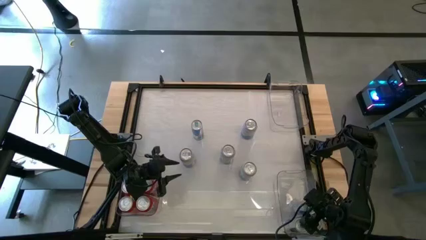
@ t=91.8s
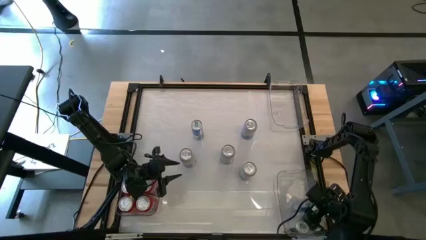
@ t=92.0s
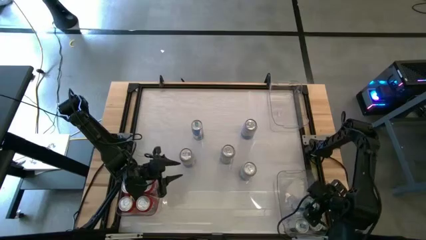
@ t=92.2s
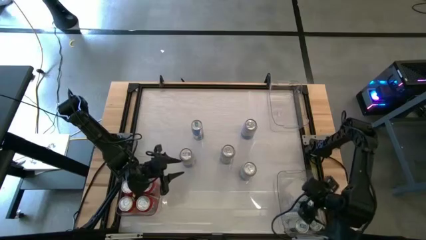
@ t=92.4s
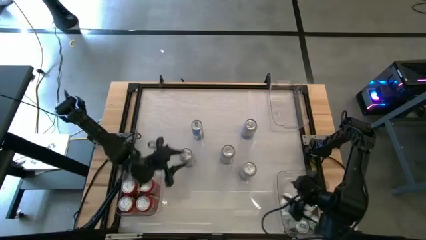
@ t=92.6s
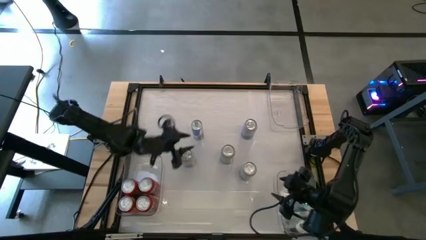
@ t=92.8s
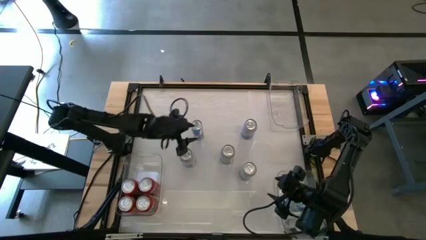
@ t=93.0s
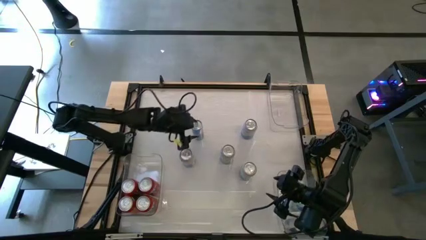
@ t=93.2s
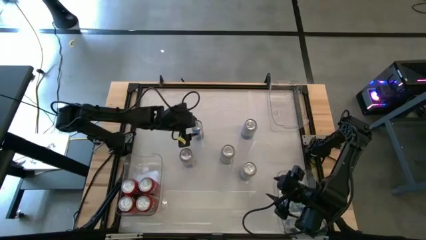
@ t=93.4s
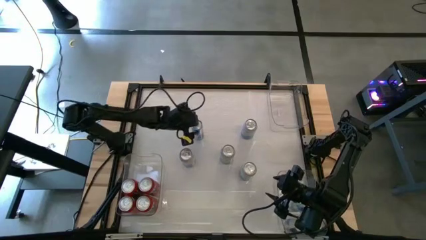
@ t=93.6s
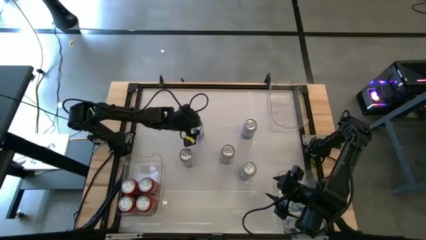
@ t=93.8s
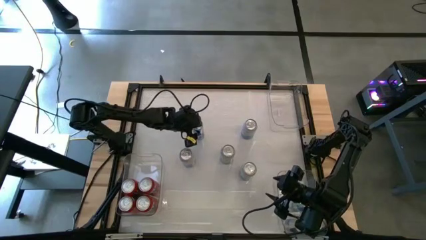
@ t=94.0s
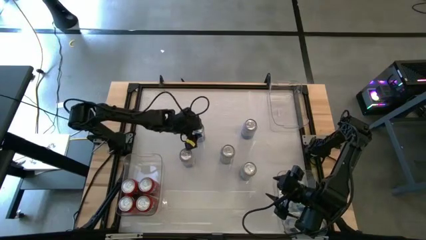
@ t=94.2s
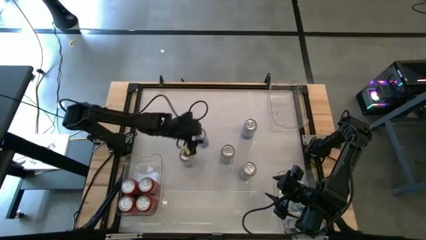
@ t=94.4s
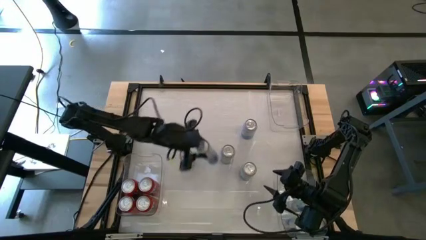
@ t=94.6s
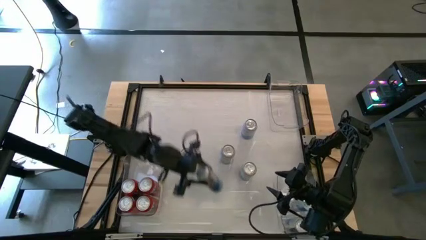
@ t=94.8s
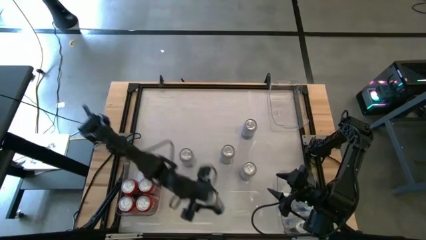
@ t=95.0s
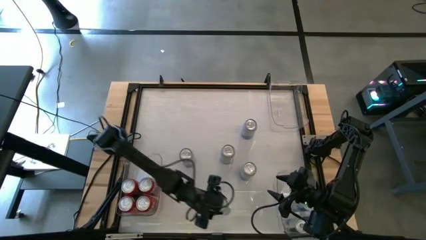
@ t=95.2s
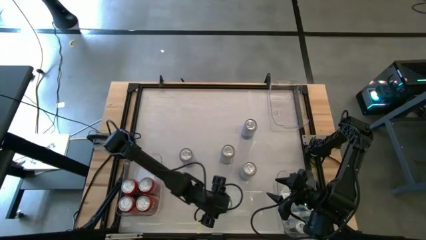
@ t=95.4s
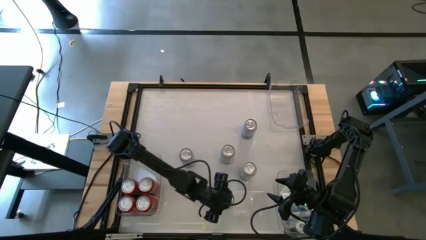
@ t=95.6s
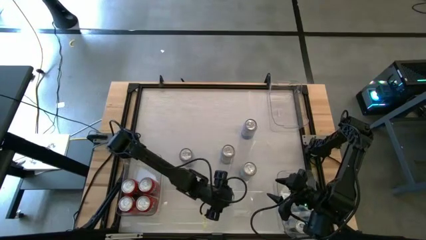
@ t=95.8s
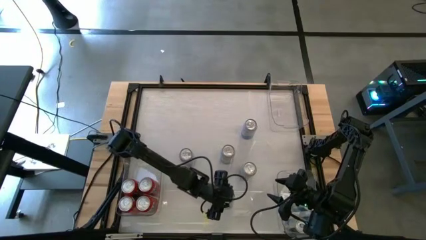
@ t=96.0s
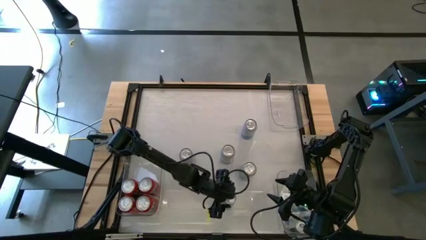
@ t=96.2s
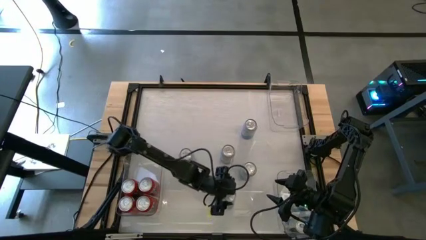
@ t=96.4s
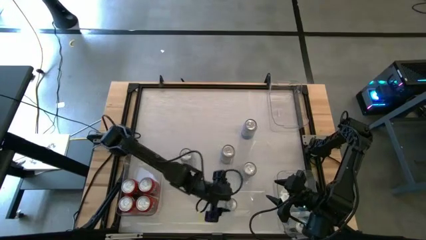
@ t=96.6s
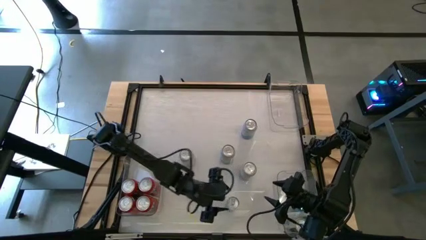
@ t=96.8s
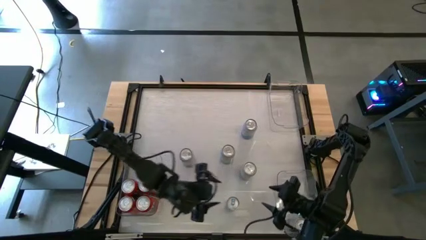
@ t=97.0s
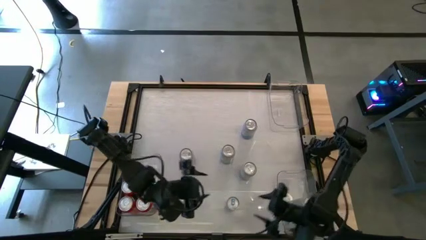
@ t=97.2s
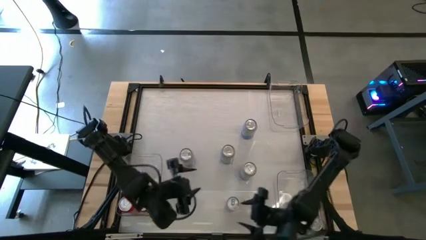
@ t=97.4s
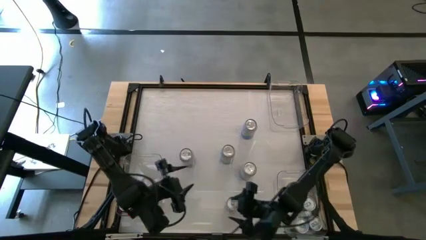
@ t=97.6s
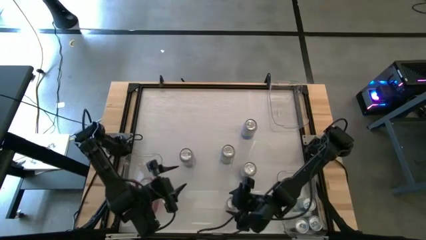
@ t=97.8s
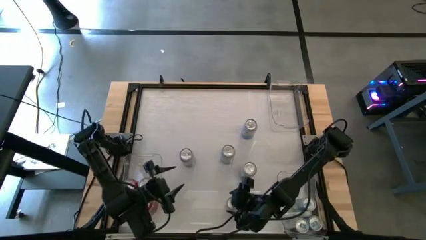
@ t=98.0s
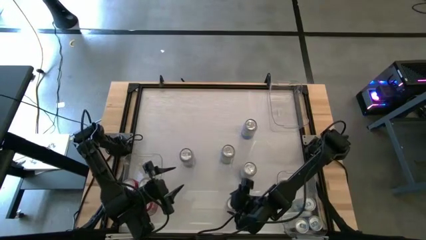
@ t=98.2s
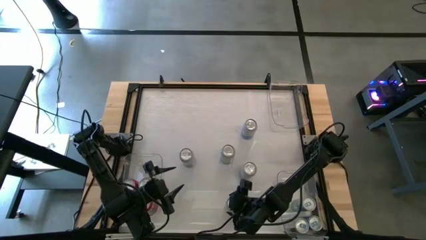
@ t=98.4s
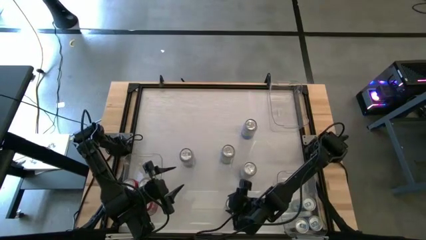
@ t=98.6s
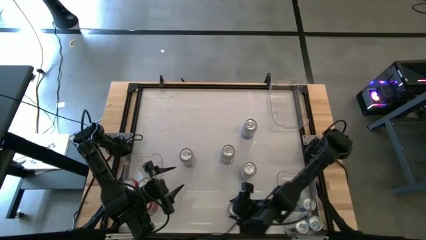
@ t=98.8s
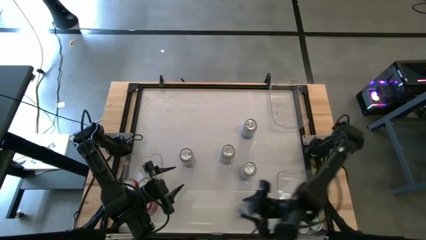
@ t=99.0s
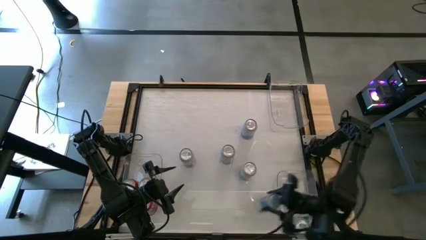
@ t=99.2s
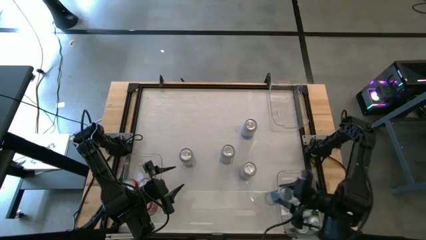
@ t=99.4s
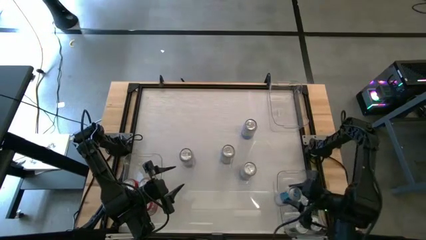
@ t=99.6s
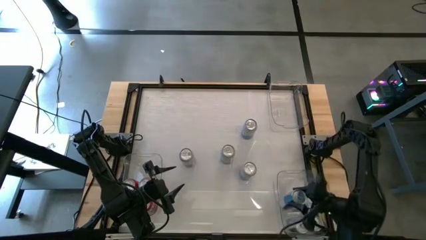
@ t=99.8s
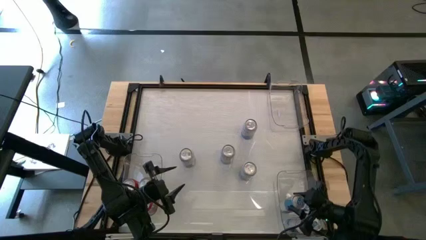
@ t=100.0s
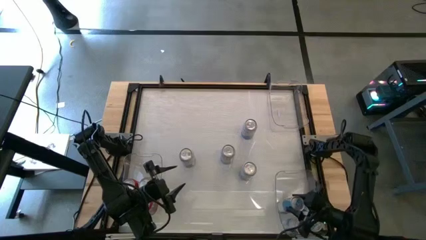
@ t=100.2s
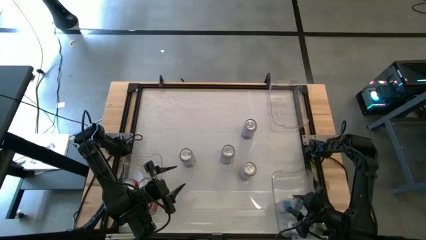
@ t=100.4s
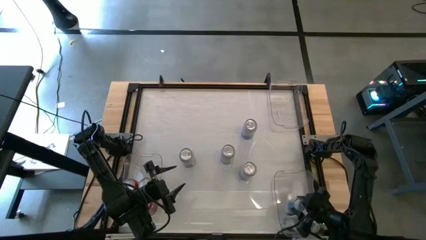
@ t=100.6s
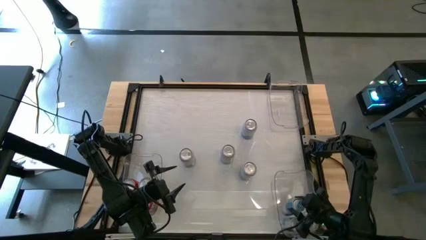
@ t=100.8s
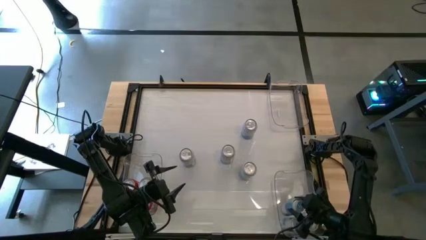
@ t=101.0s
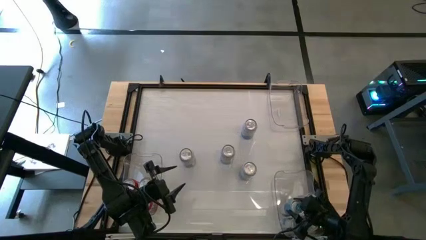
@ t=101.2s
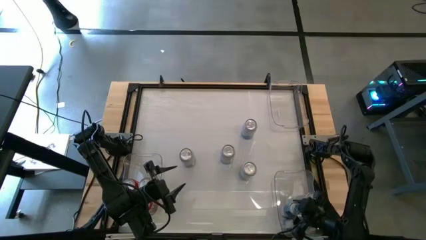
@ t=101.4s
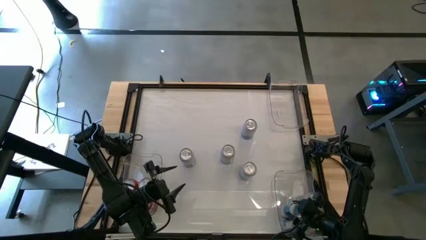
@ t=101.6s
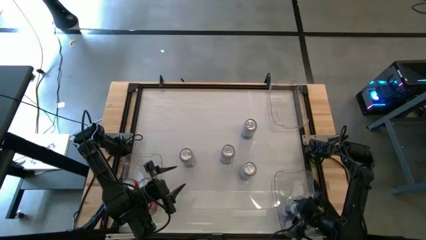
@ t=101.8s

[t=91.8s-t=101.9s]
Task: Sort soda cans
Put the top blue soda can into the bottom right transparent bin

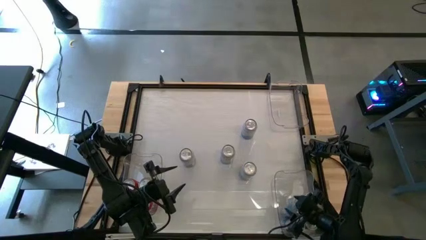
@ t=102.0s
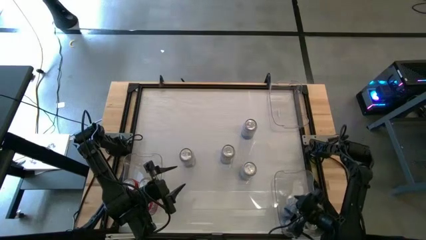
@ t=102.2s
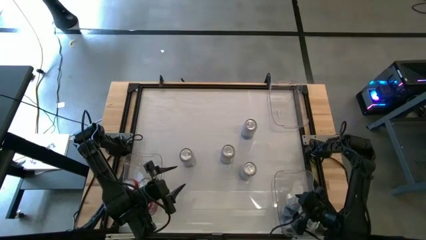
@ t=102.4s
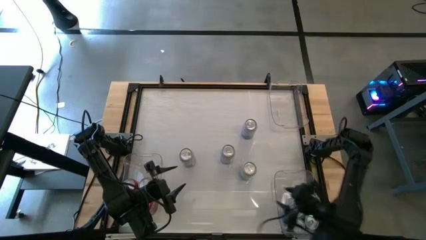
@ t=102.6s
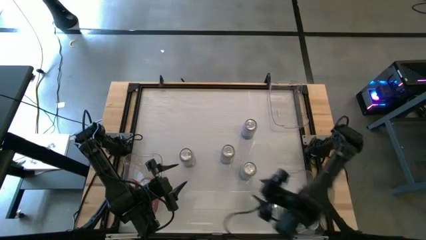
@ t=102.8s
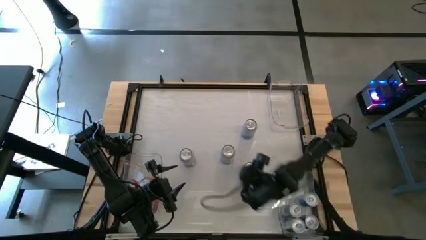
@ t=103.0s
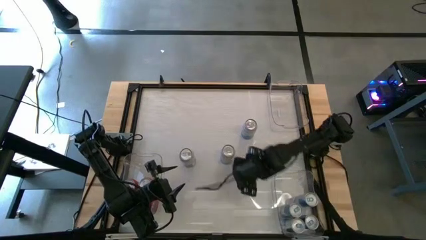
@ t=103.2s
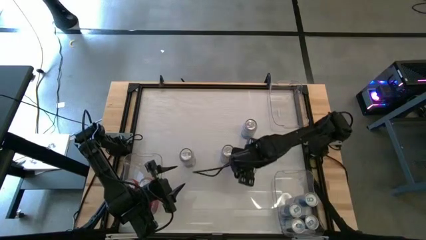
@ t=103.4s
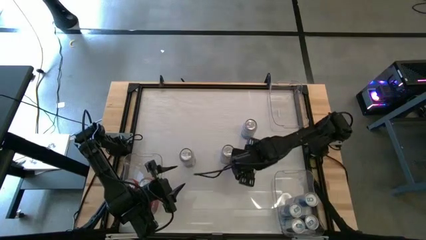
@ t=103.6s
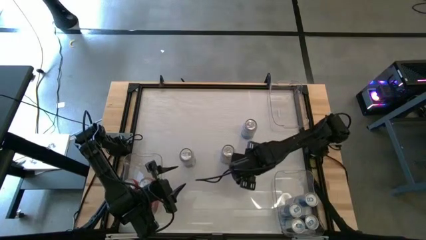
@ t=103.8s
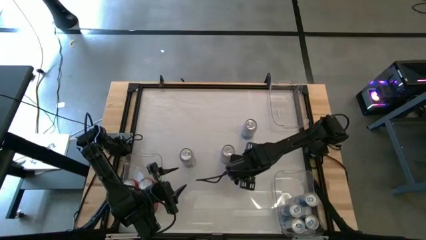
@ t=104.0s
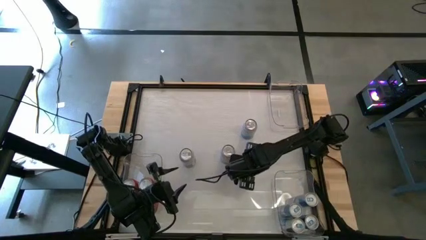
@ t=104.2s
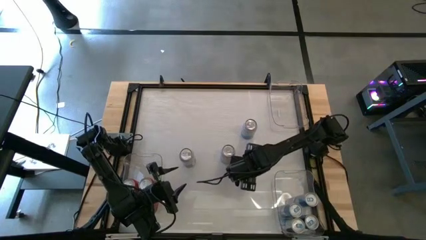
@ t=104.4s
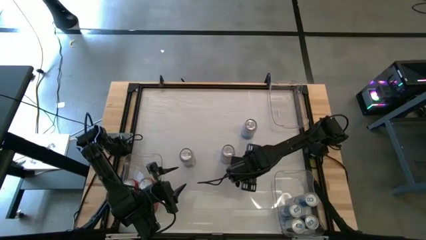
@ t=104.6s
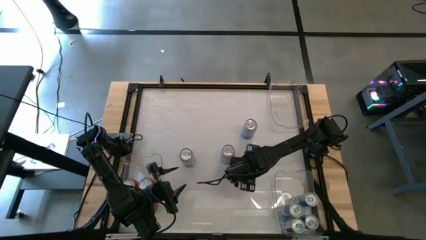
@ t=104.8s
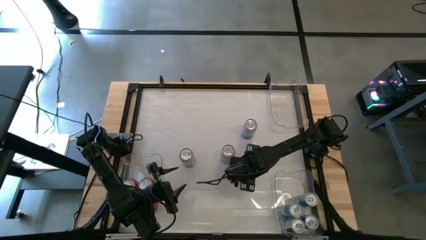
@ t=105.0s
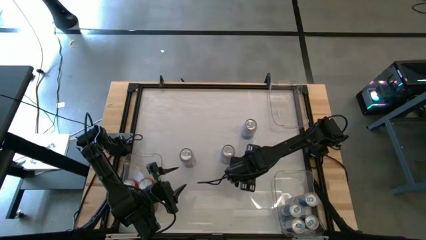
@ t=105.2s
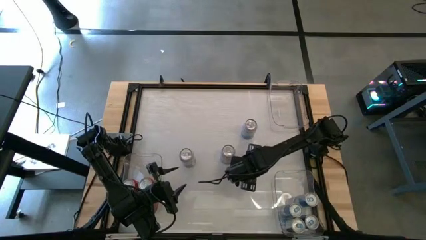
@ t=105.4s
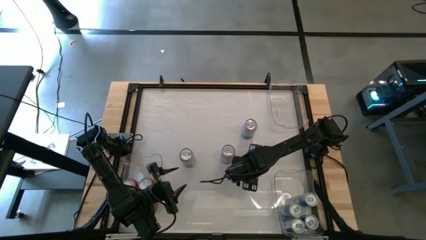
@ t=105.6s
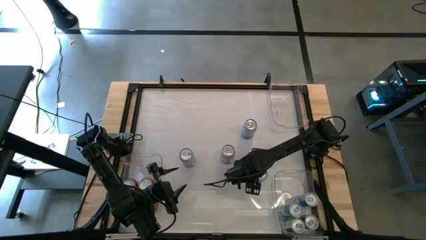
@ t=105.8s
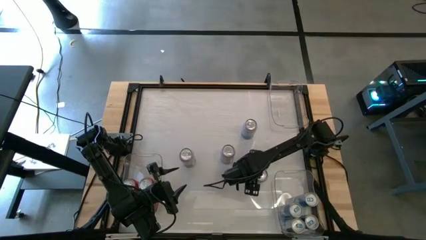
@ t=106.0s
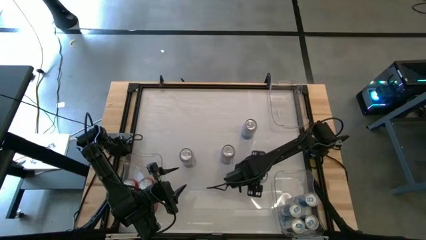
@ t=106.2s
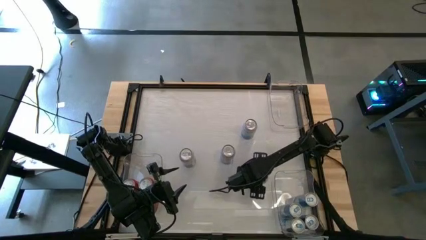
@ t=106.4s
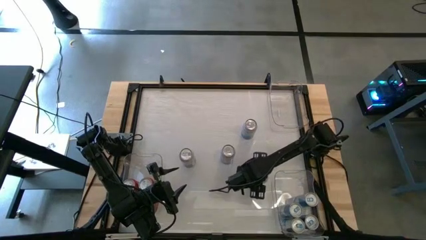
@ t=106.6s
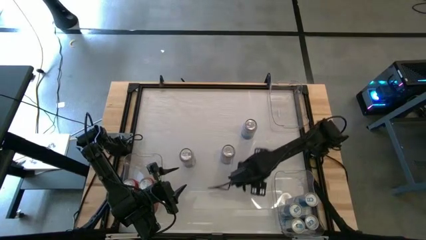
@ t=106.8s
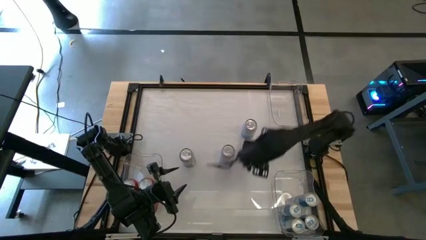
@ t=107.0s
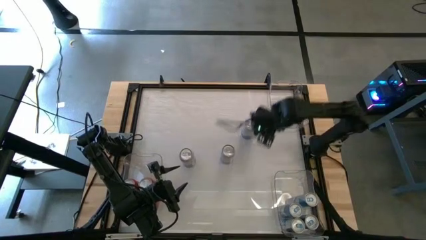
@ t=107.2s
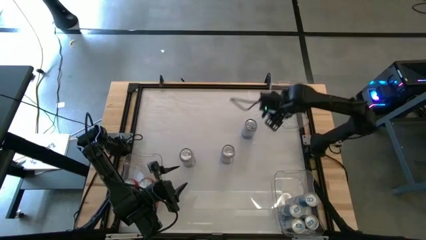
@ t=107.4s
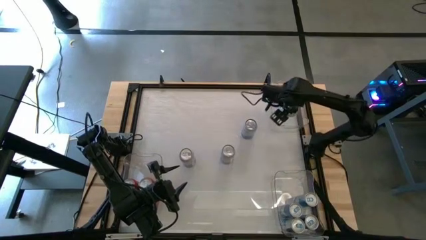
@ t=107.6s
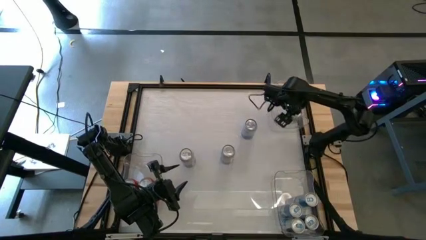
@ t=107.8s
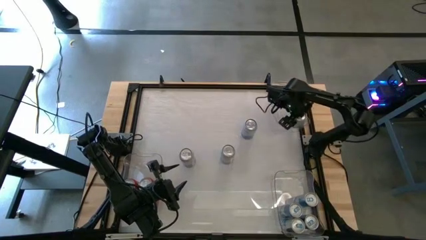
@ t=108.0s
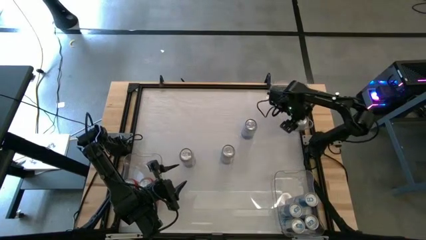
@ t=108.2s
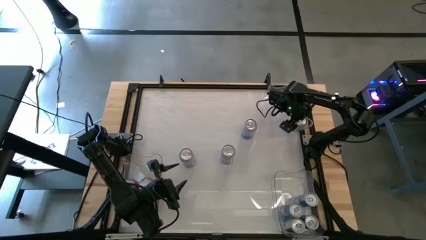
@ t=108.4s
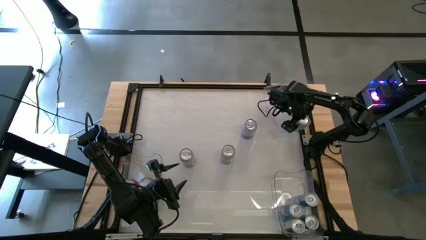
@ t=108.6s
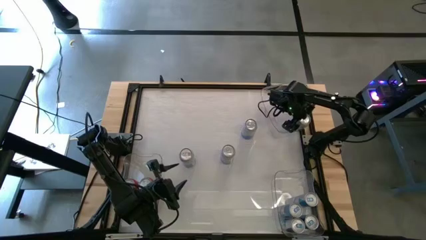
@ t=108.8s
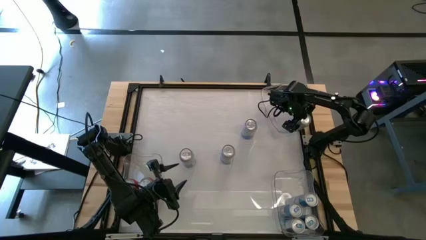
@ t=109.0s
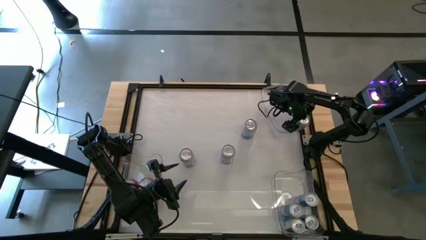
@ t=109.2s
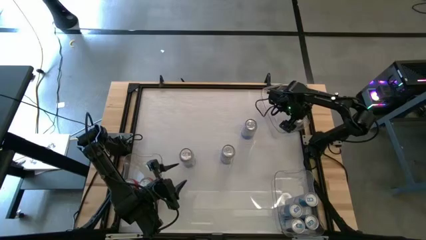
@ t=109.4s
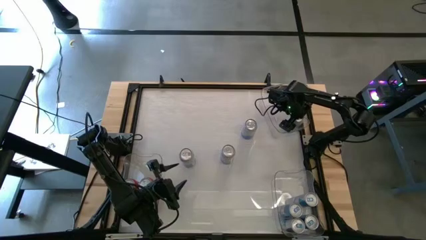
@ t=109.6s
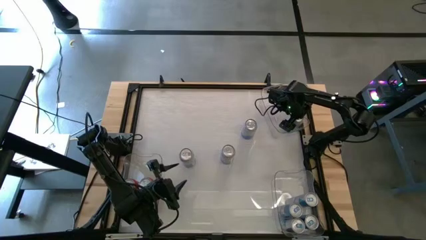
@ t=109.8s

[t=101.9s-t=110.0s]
Put the bottom right blue-white soda can into the top right transparent bin
